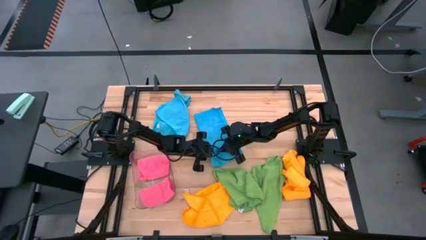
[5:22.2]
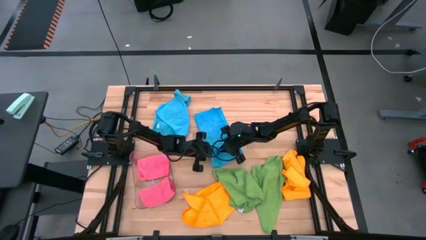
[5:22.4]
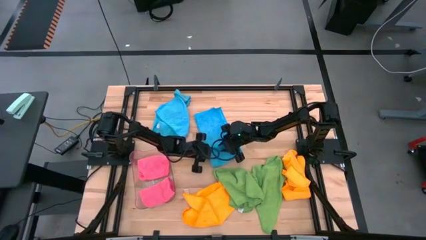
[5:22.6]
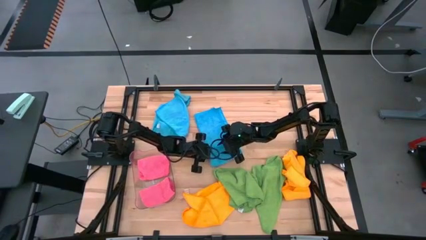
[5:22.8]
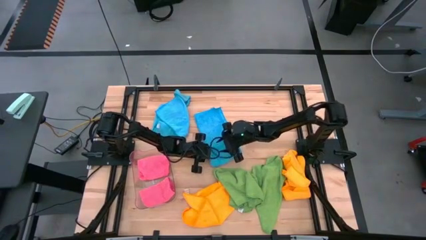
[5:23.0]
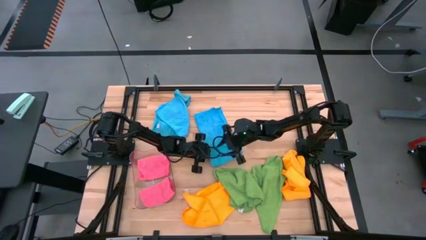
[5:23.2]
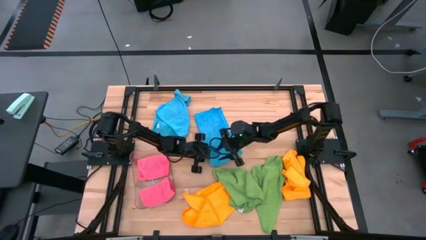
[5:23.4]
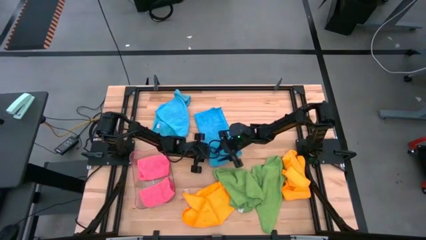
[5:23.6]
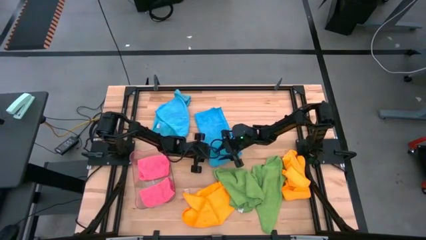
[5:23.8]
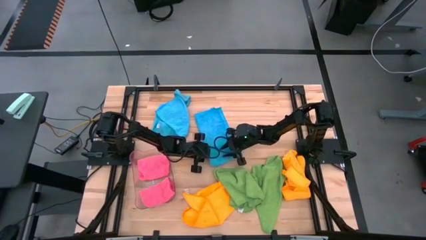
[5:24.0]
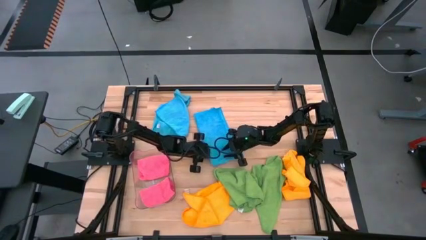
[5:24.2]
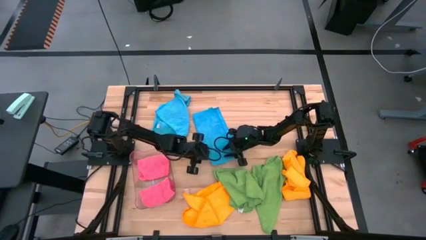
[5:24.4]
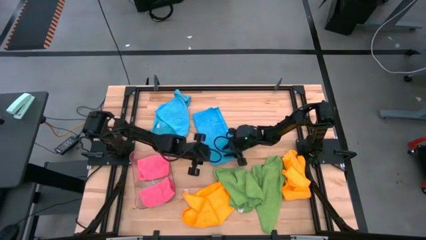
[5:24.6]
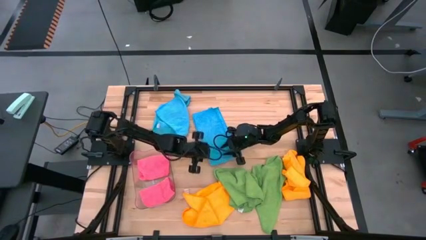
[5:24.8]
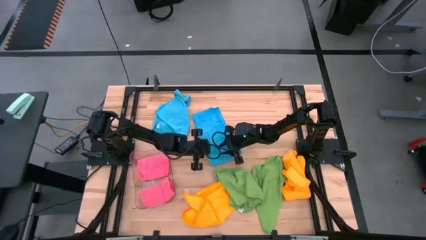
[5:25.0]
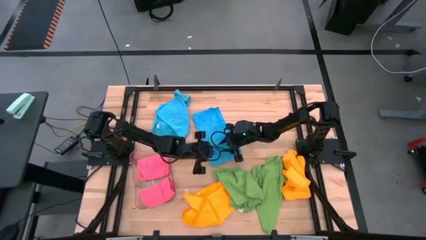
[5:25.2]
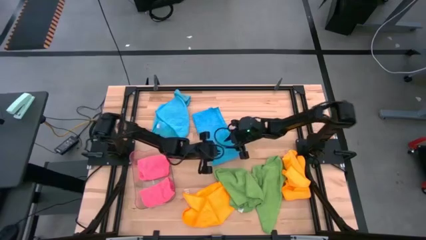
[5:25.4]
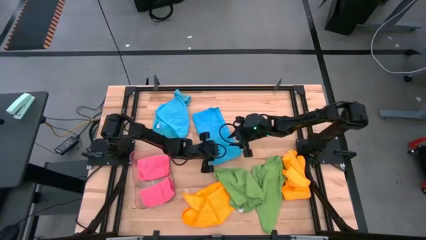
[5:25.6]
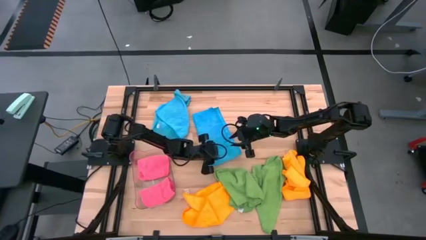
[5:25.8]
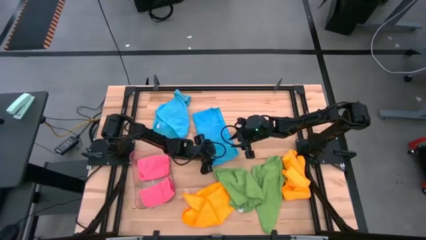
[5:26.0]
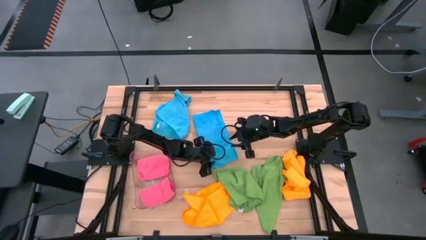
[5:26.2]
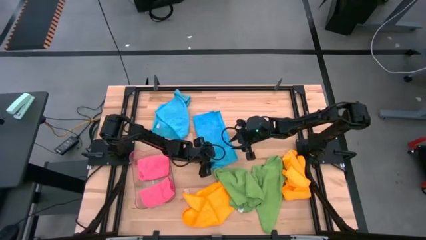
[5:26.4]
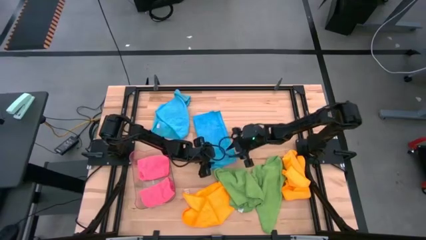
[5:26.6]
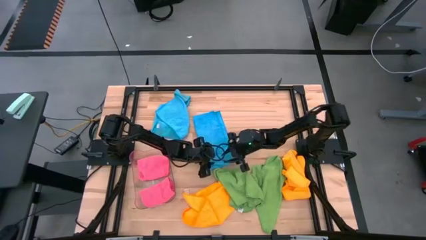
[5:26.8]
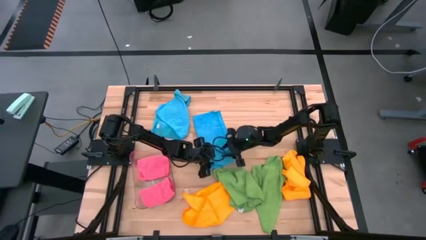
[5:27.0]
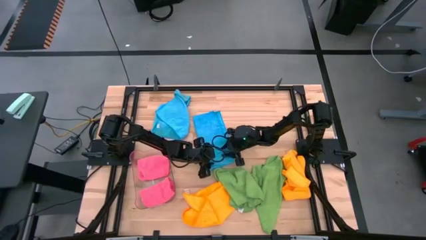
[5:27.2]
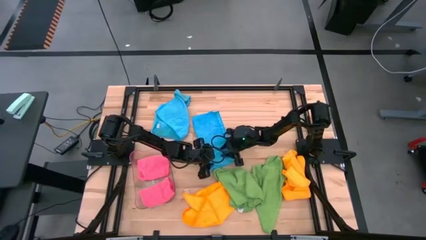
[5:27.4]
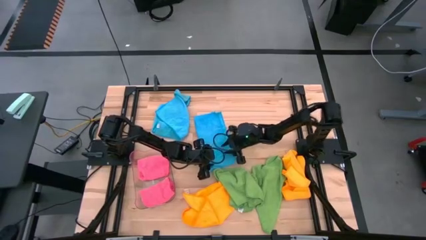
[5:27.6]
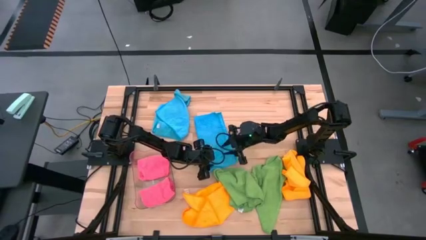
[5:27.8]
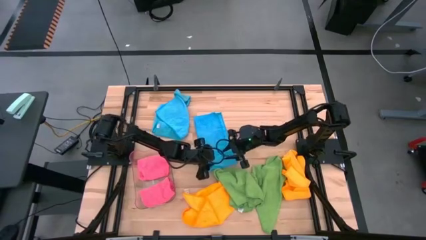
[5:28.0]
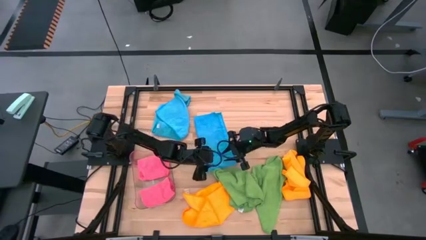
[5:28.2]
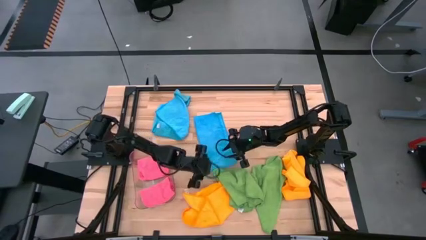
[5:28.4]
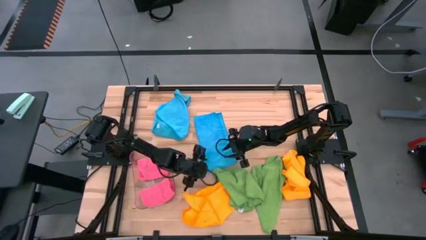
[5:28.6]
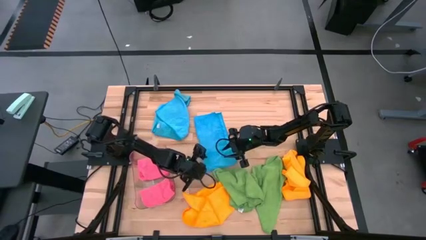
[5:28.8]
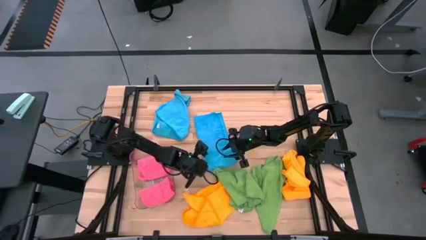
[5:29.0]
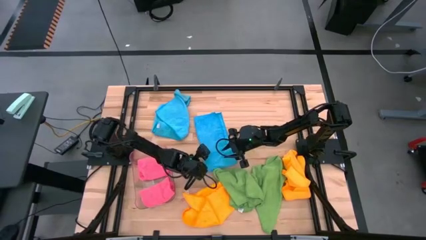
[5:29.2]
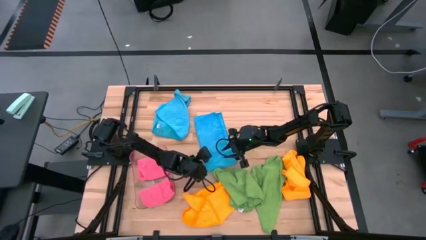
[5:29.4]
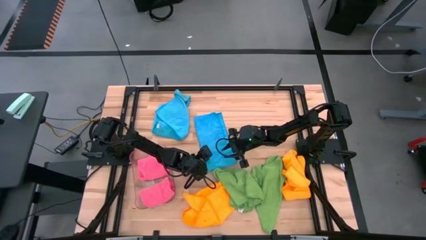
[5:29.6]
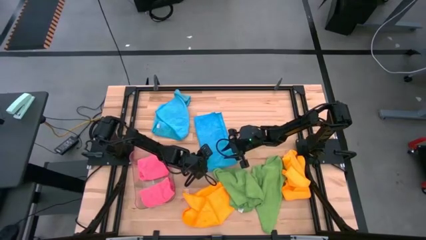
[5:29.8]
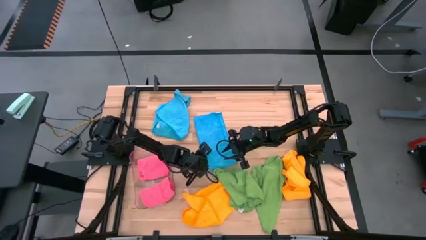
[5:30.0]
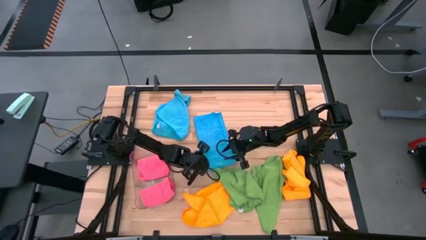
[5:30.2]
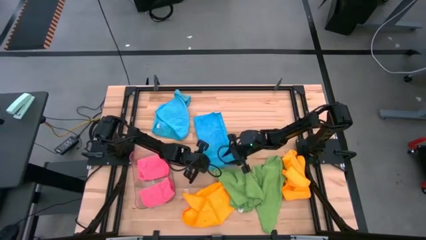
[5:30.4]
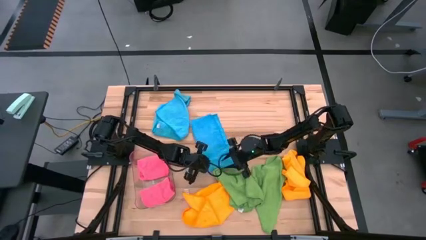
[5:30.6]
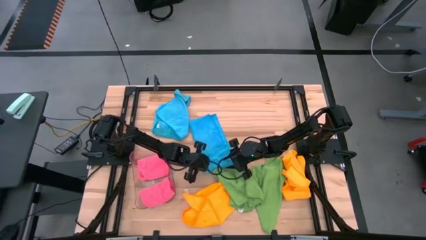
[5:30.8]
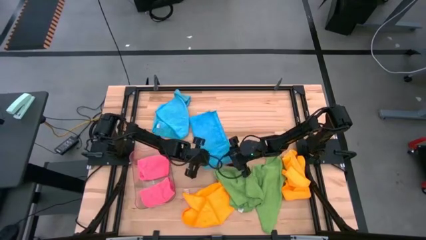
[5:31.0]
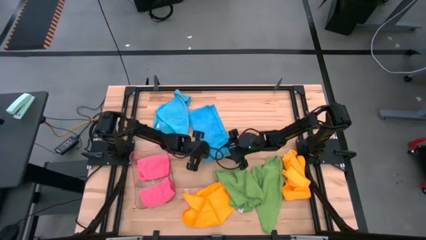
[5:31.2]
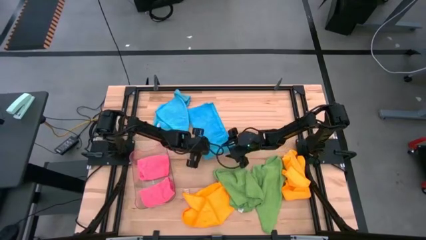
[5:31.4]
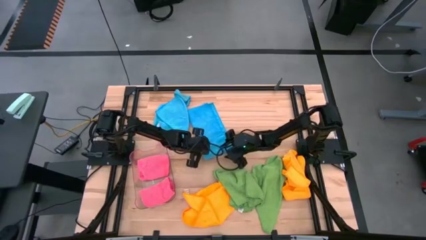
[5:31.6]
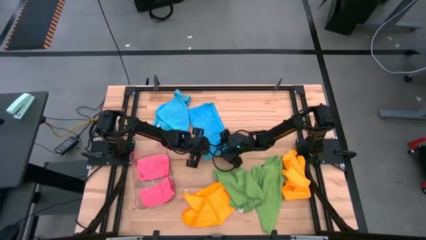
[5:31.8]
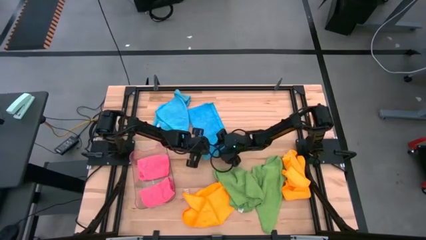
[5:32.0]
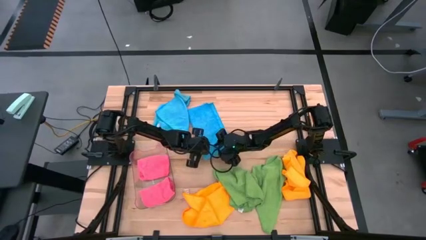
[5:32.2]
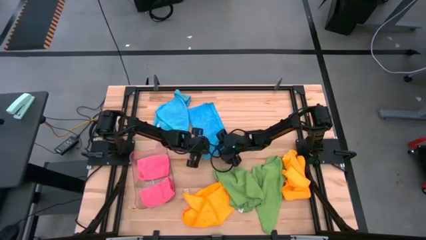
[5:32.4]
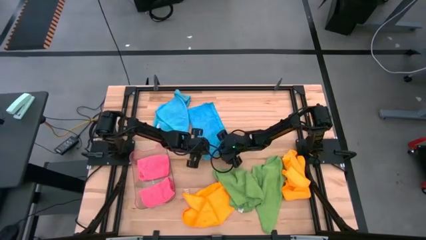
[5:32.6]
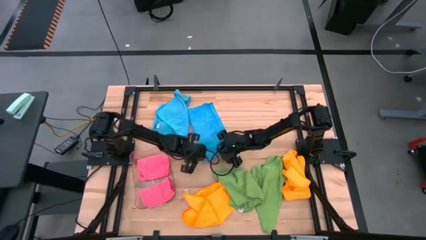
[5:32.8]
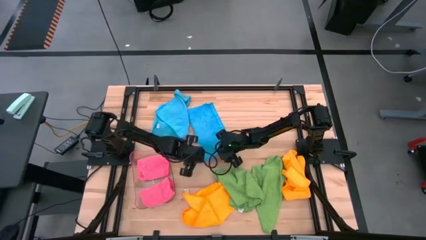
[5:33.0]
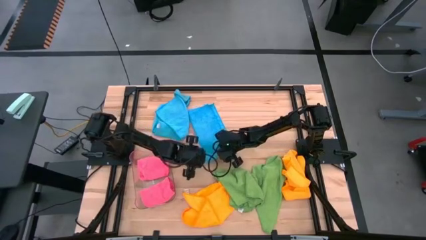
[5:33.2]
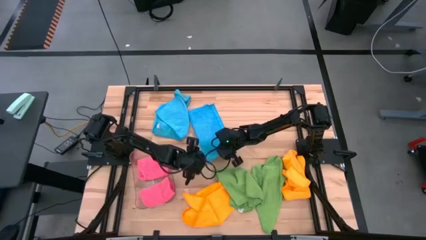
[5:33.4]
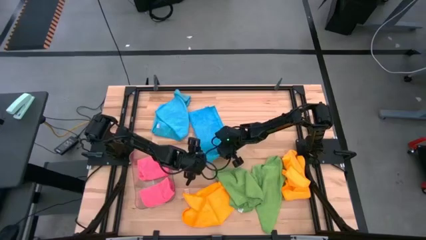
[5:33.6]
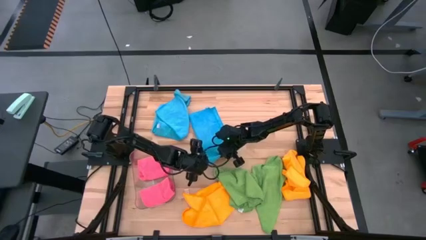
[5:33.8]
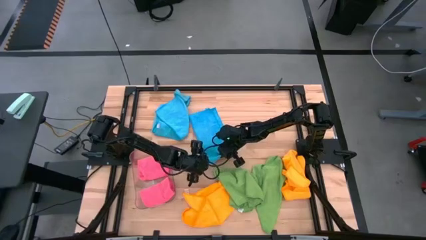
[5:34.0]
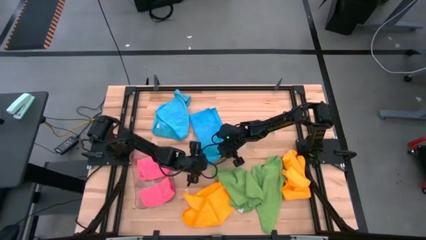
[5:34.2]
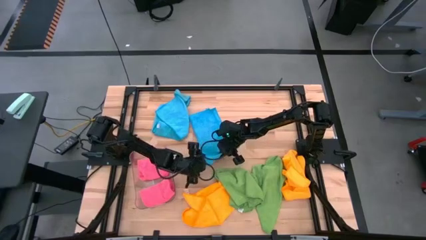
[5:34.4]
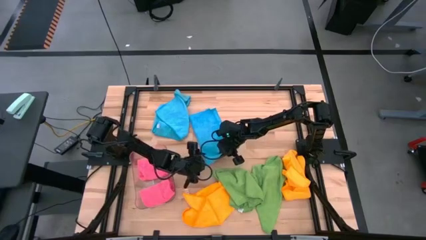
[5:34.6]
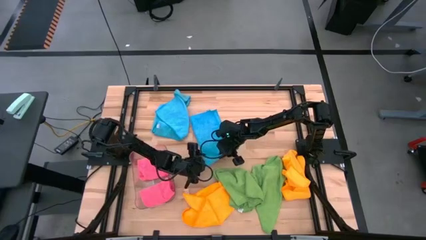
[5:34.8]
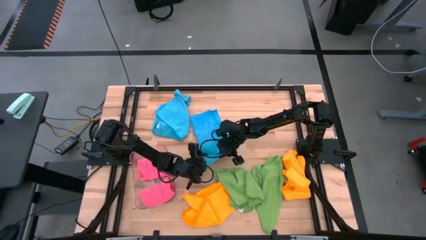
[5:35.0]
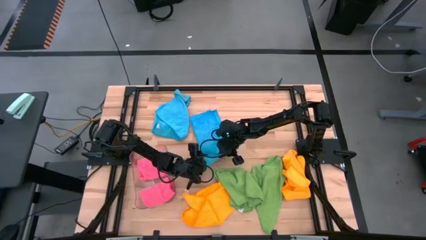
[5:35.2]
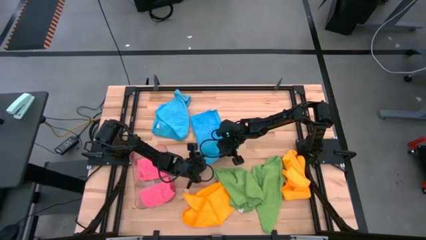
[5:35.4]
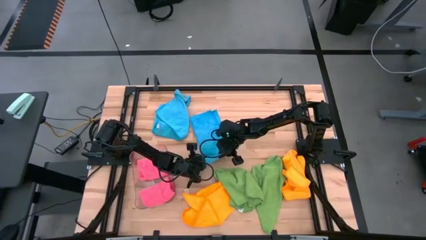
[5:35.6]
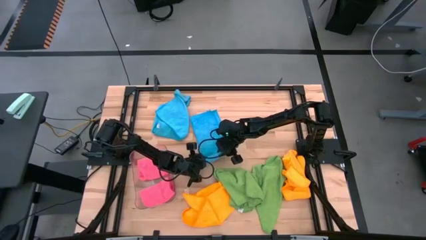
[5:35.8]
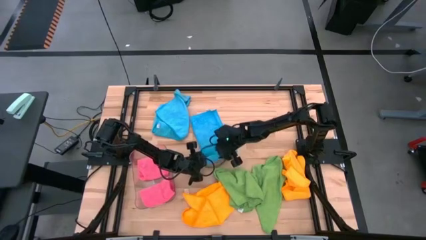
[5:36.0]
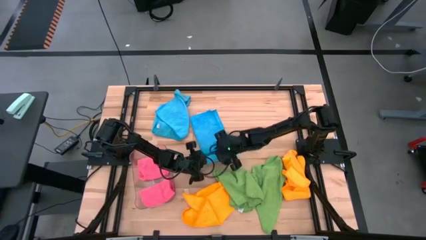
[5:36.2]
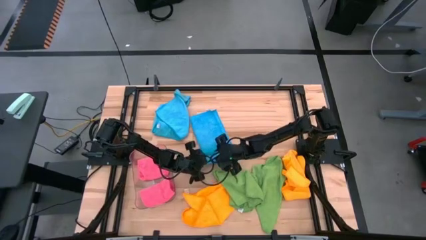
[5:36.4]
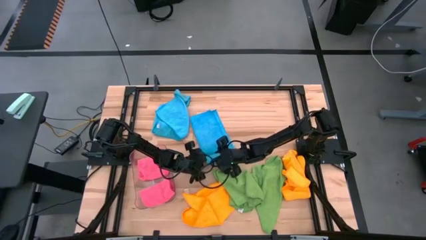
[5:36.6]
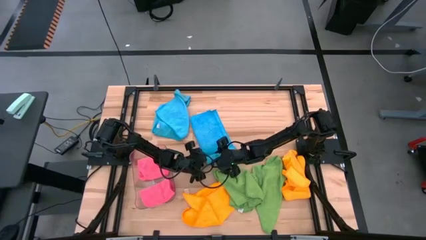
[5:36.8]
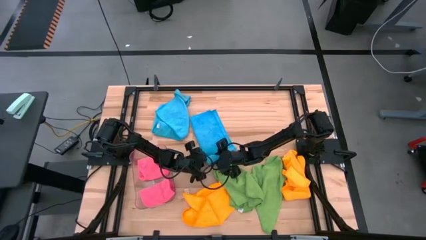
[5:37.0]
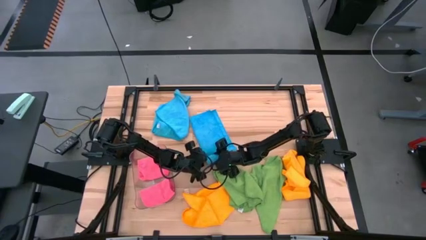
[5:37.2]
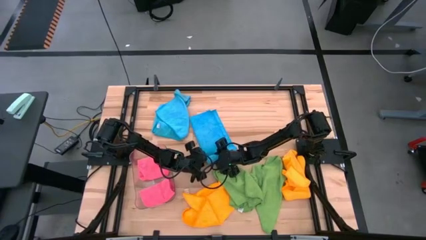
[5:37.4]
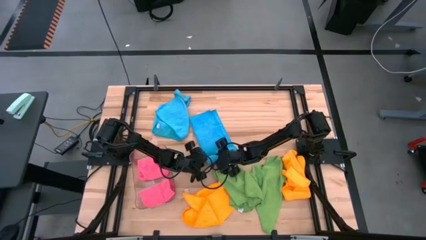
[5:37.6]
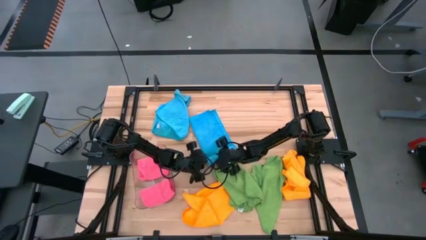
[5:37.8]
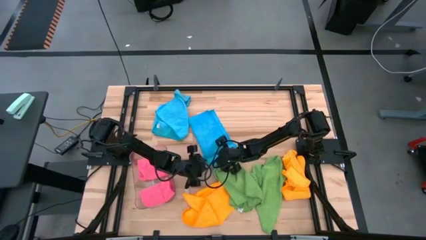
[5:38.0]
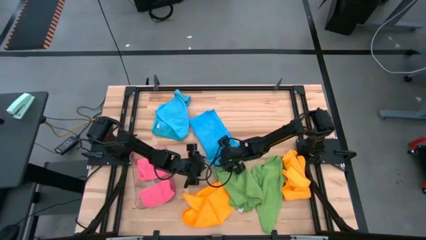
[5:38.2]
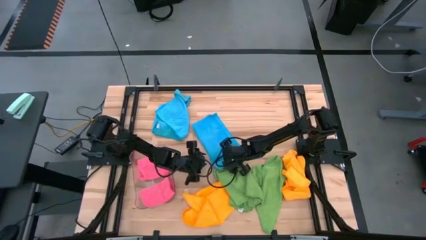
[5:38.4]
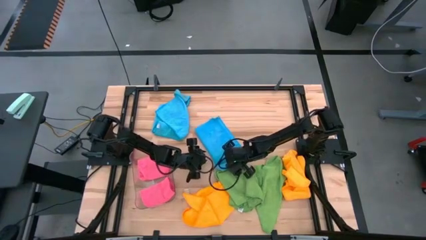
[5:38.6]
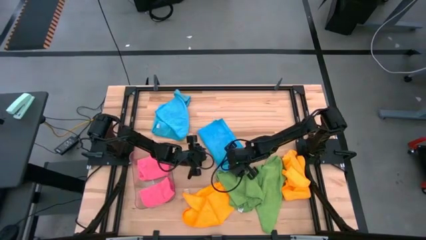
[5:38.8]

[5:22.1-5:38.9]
Task: Fold microfiber towels
Fold the bottom blue microfiber cloth
